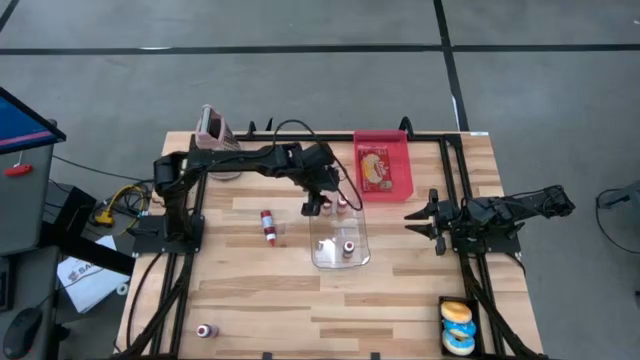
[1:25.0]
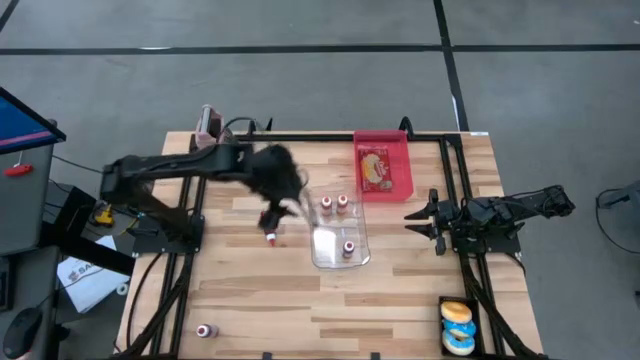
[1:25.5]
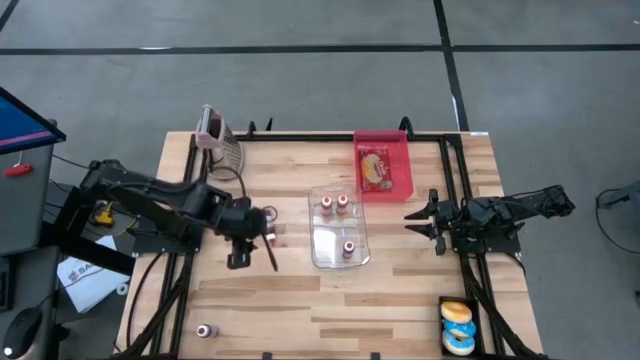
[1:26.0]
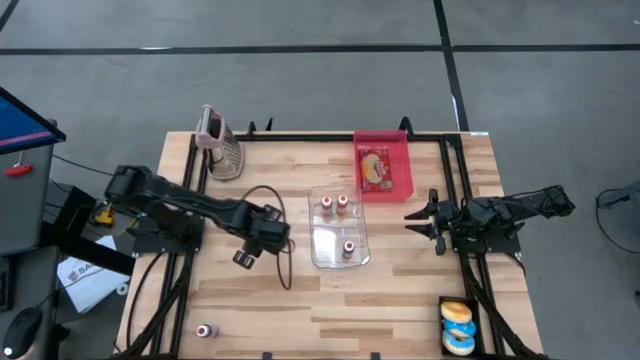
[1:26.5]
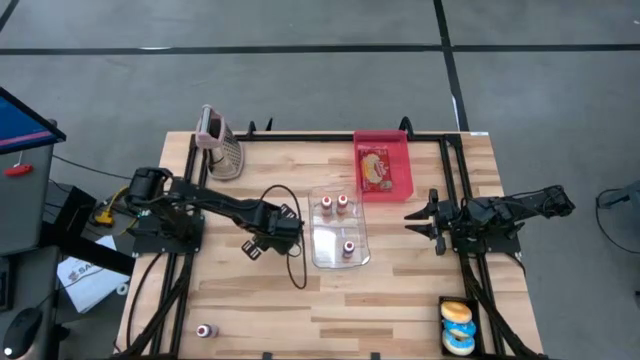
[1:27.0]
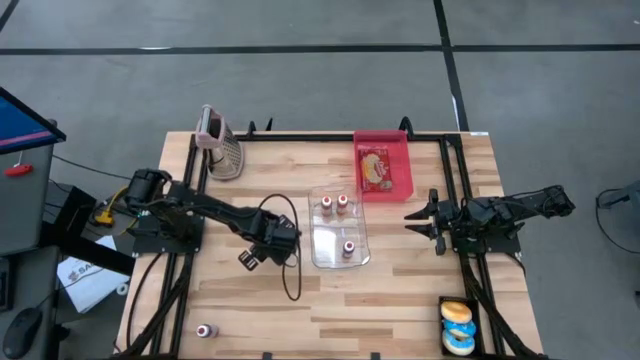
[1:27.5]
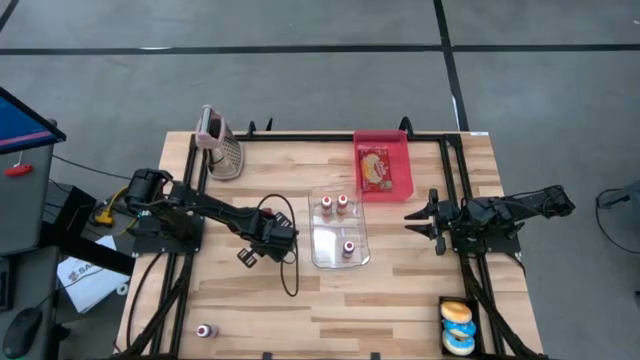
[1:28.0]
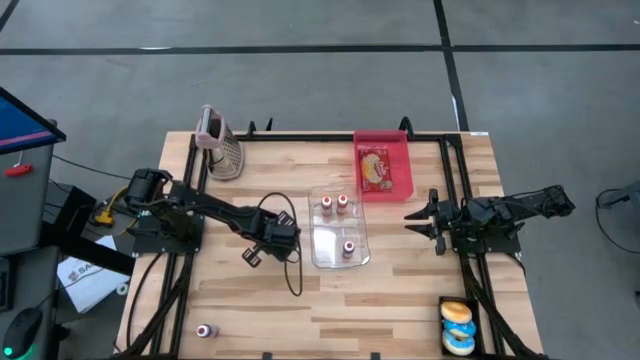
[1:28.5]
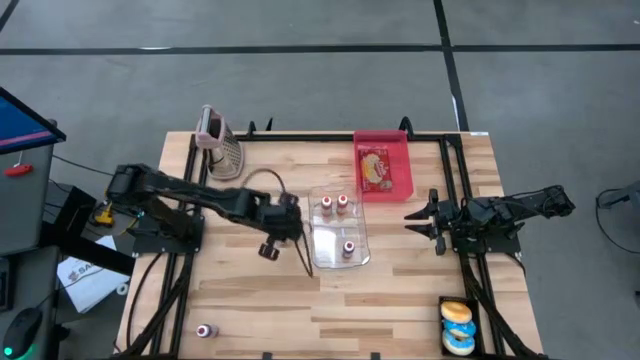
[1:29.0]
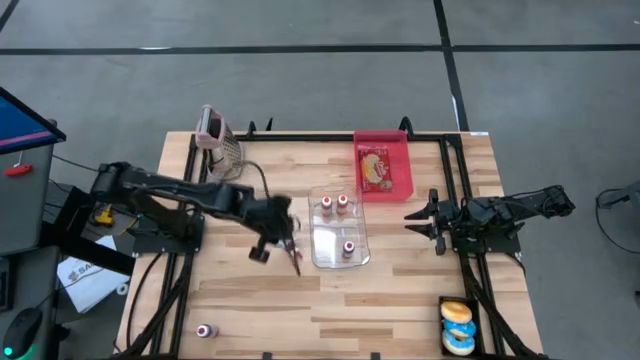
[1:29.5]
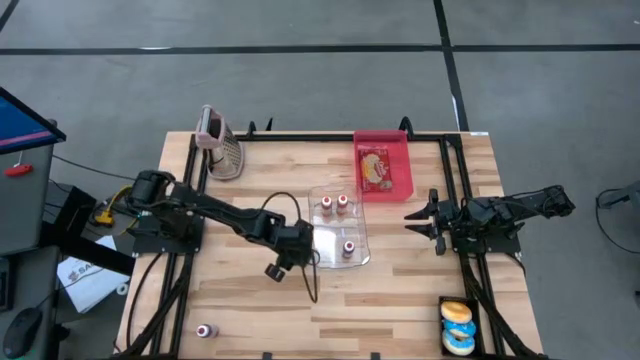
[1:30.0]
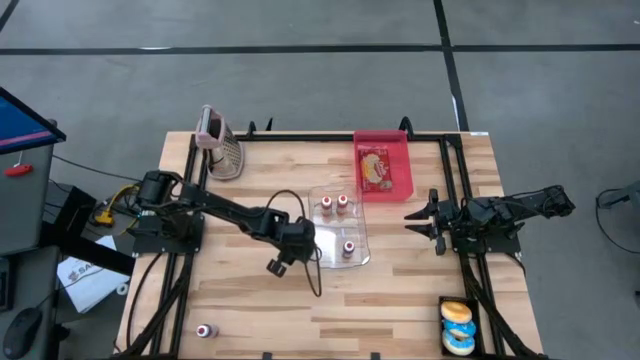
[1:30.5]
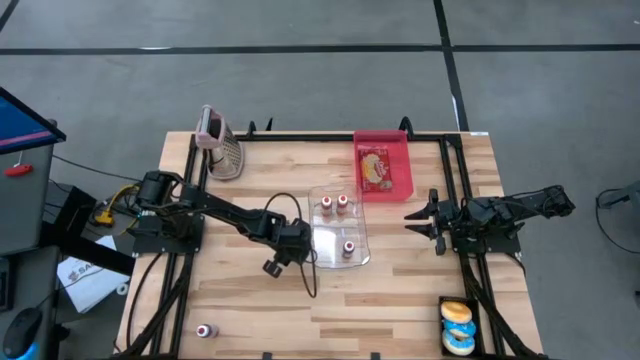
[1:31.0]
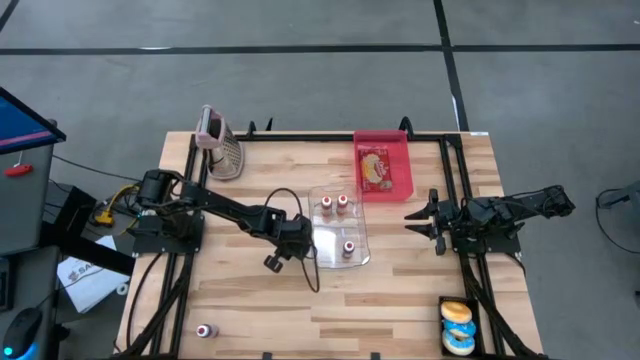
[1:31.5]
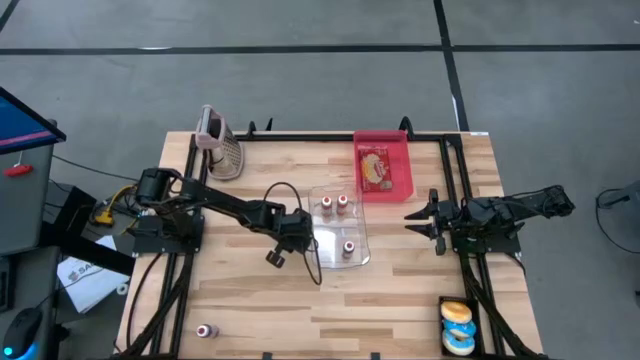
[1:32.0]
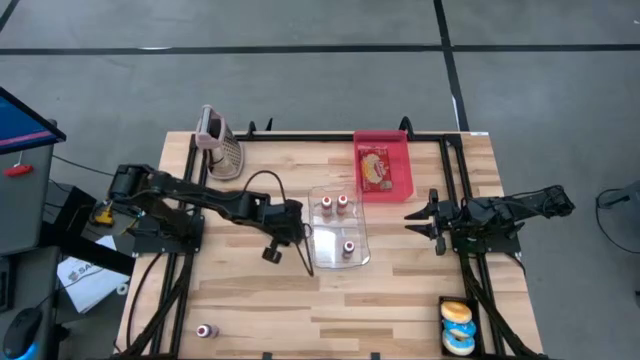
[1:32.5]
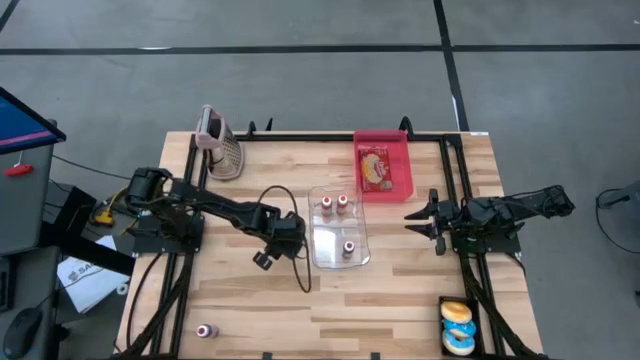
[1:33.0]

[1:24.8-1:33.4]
Put the right red food coloring bottle into the transparent bin

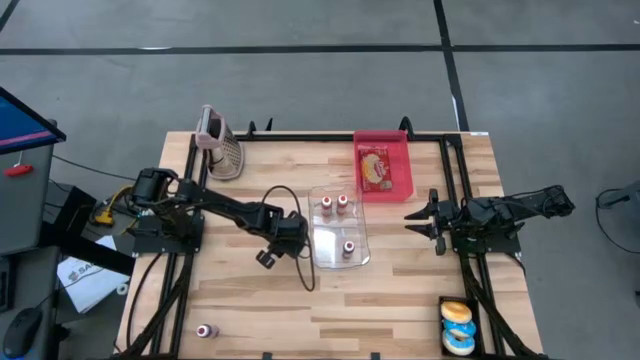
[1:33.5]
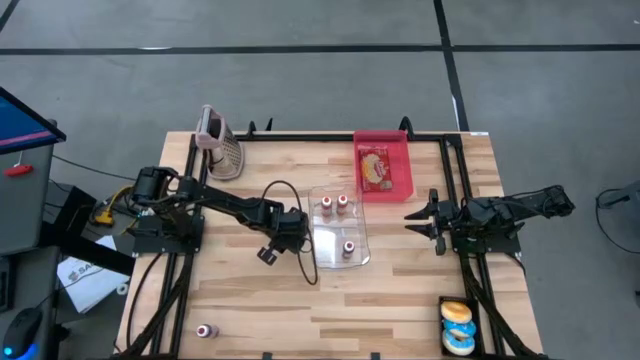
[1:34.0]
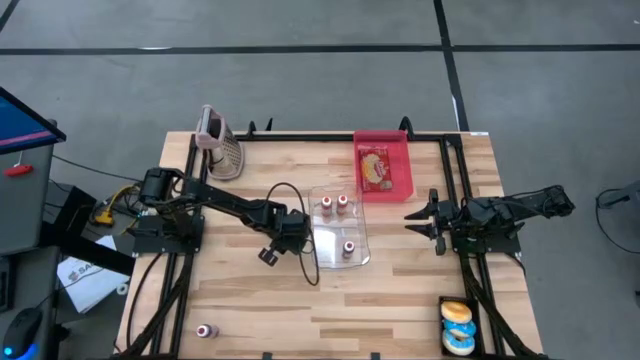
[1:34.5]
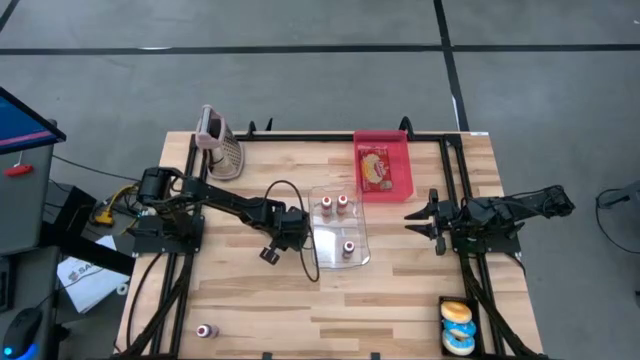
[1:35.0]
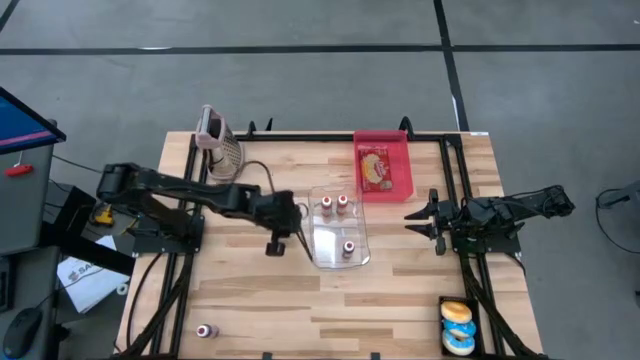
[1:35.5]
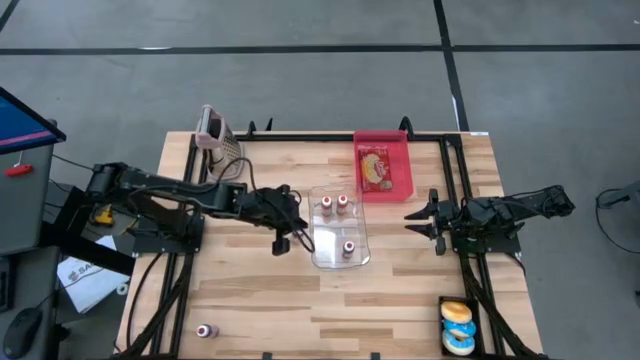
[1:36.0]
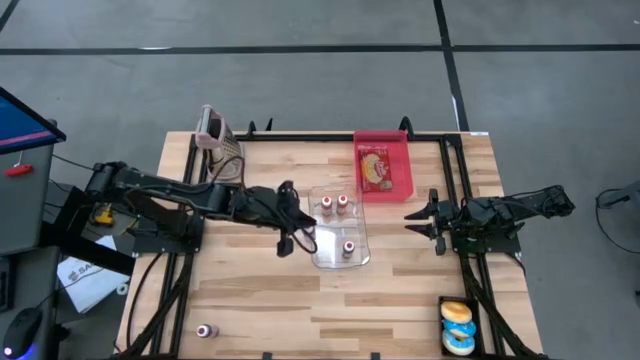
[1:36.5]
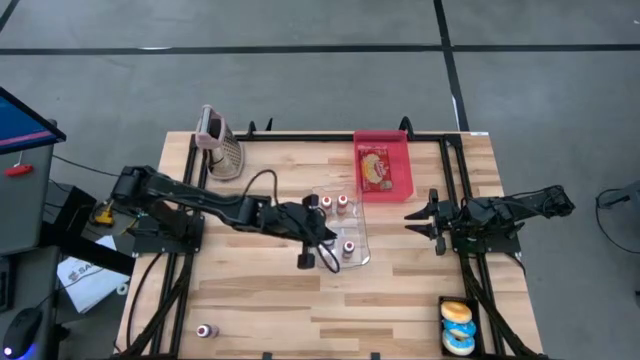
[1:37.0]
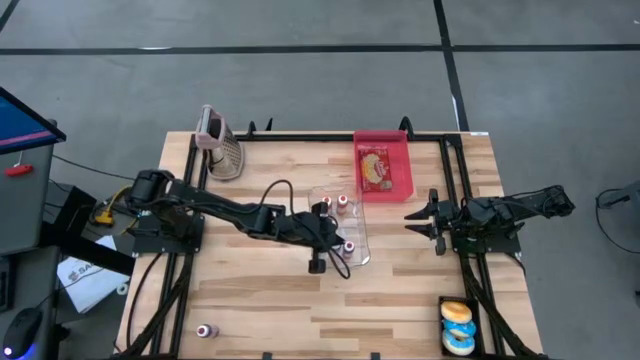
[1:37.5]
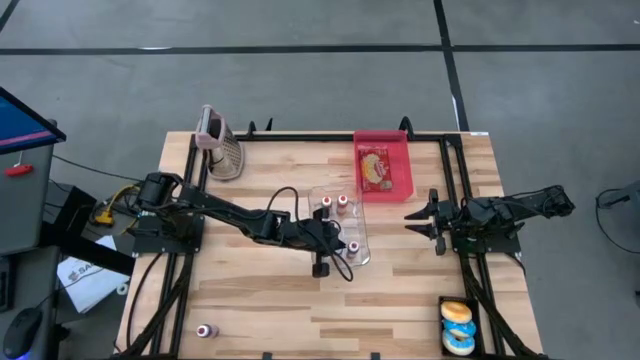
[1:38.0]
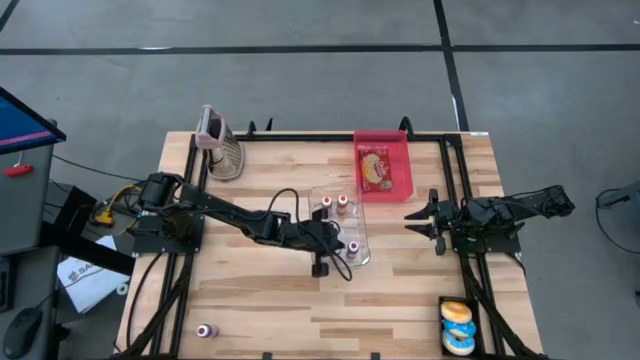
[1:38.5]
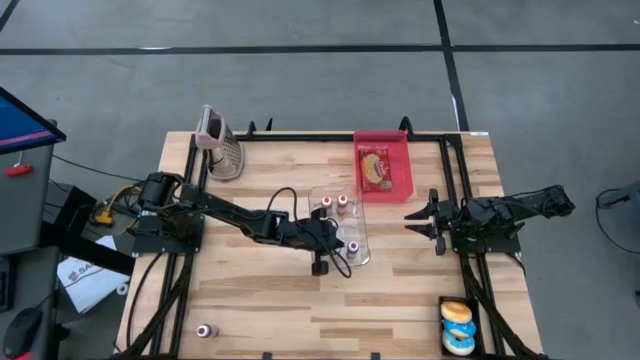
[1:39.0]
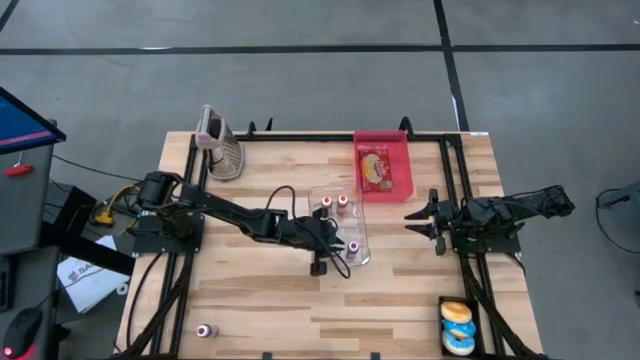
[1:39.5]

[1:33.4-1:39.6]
Put the right red food coloring bottle into the transparent bin

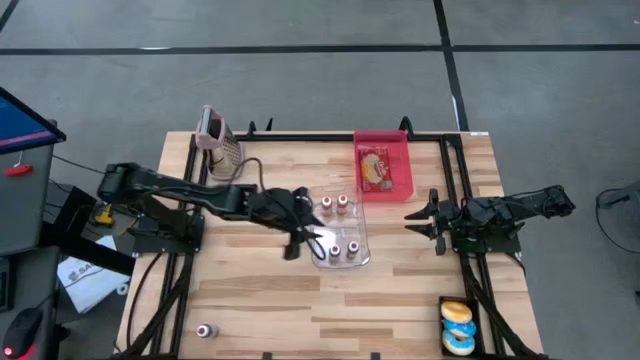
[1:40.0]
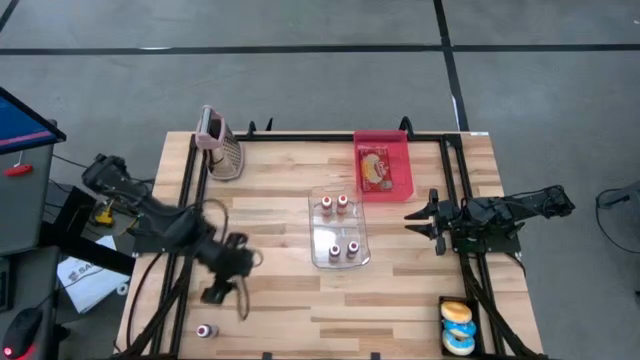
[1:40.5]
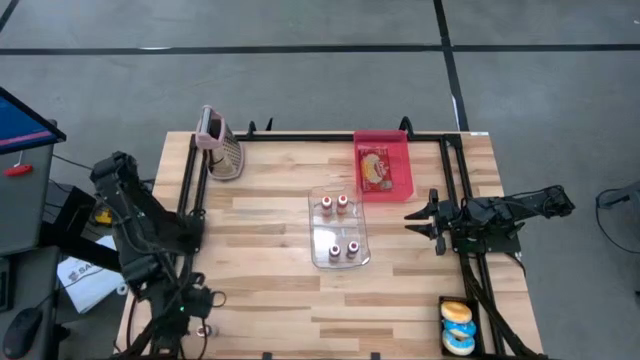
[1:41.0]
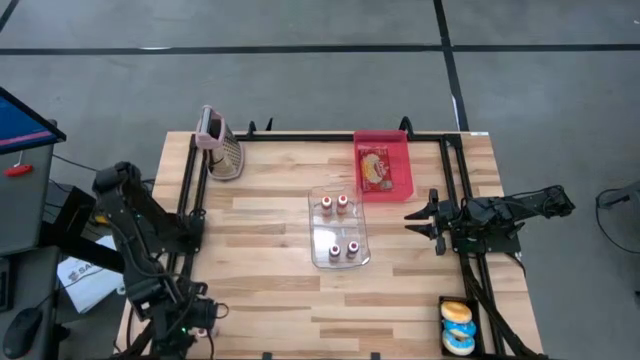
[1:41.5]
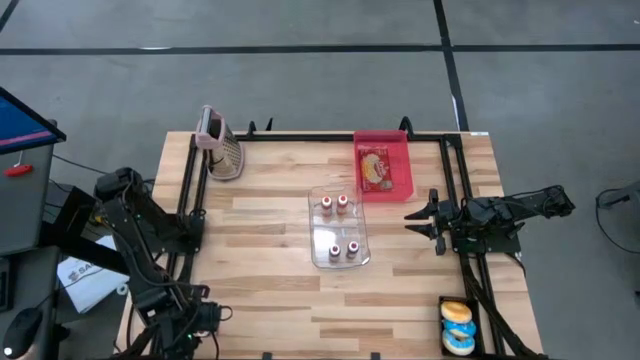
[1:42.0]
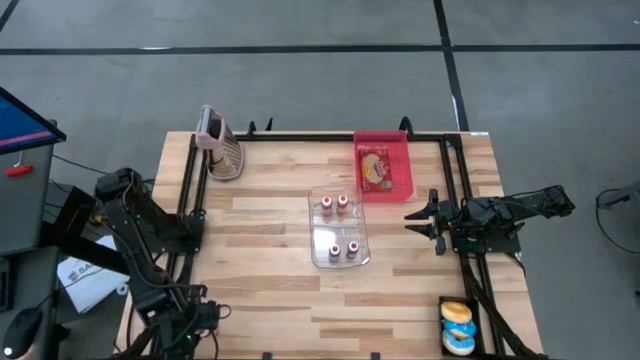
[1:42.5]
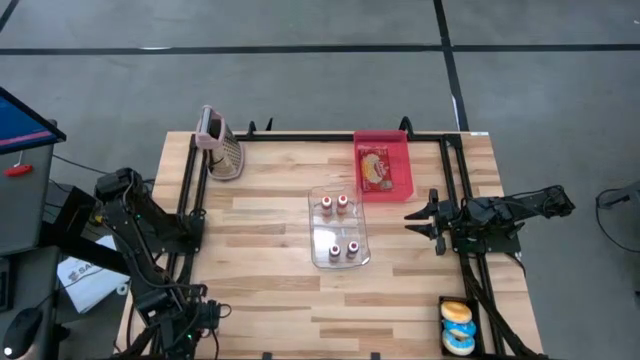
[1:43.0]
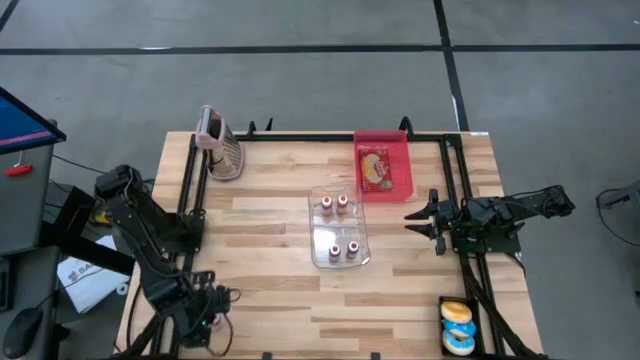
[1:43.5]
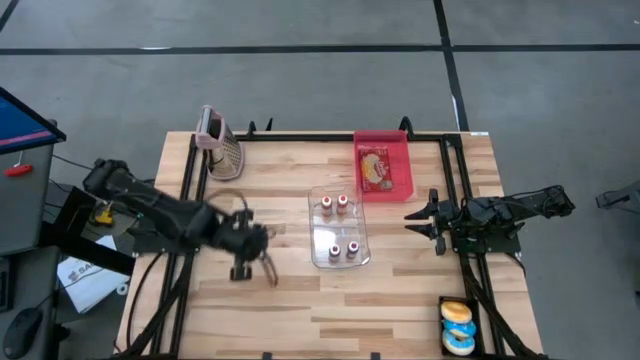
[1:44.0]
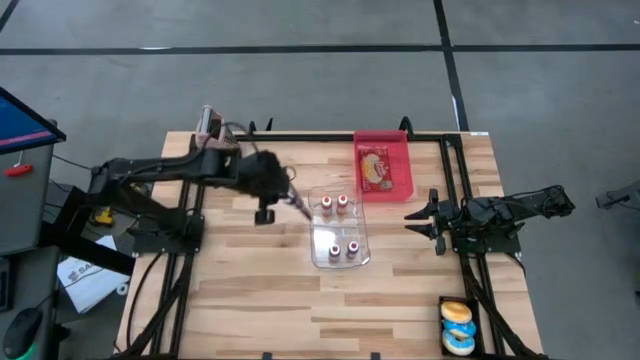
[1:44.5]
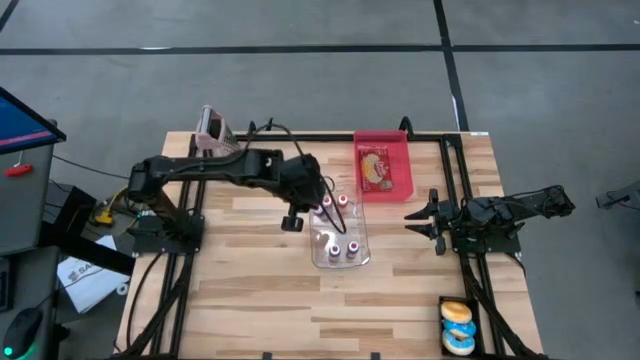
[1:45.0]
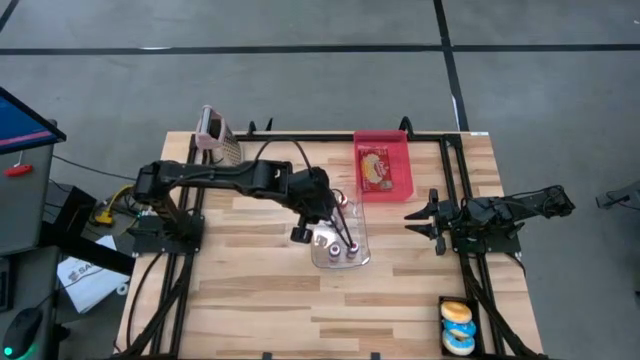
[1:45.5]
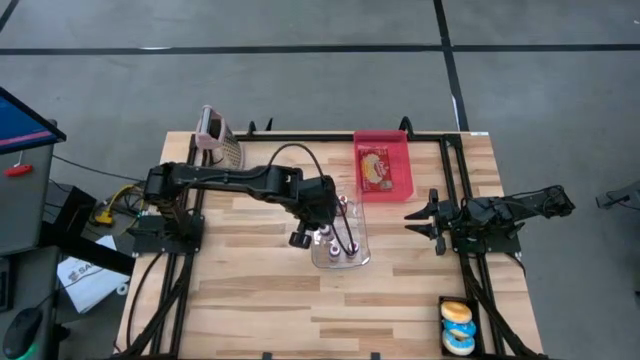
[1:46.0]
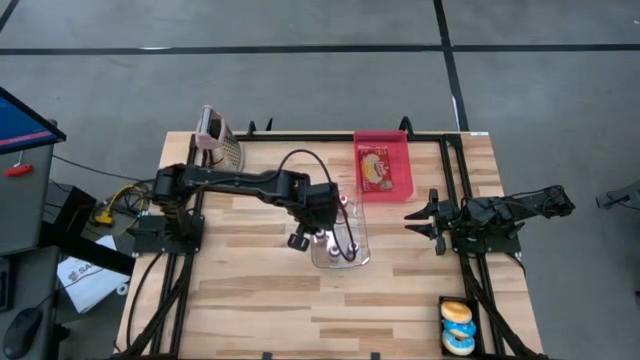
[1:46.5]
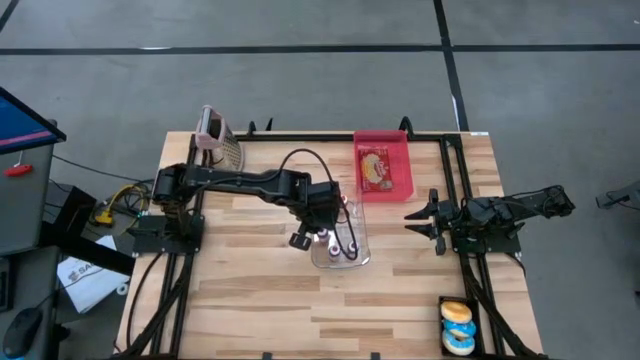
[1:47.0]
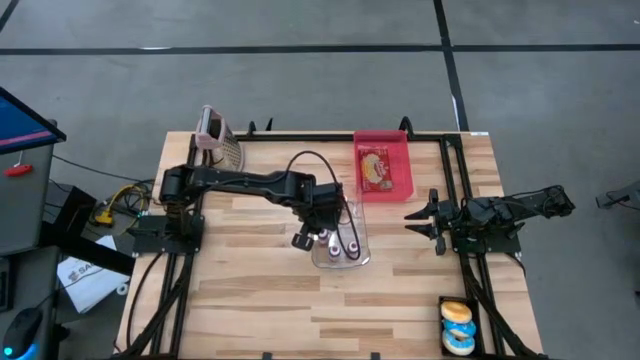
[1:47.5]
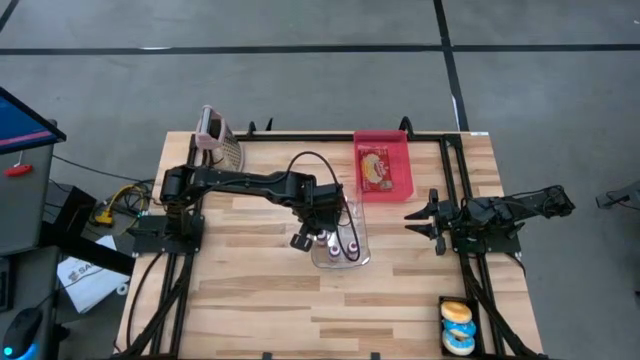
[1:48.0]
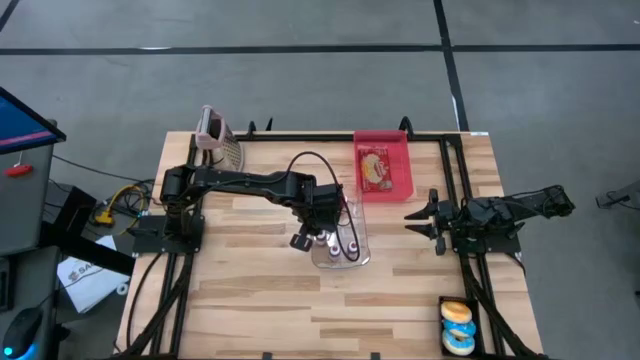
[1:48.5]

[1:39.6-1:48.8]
Put the red food coloring bottle into the transparent bin
